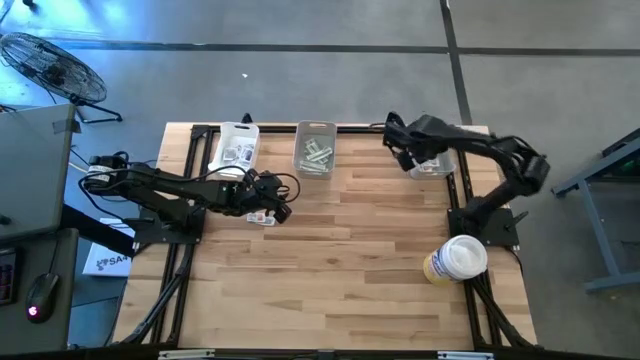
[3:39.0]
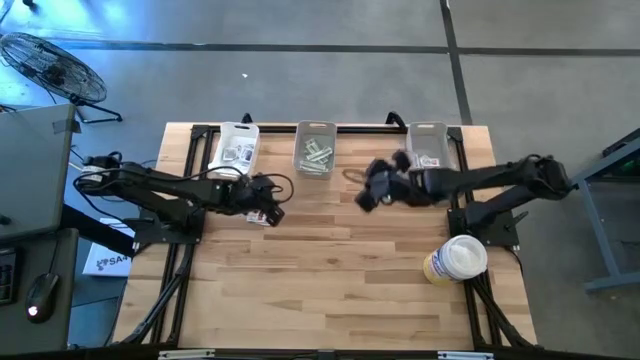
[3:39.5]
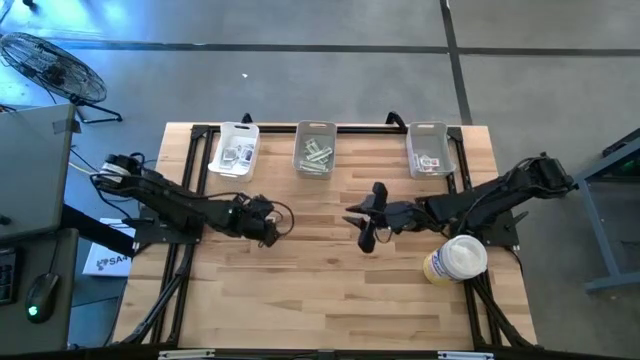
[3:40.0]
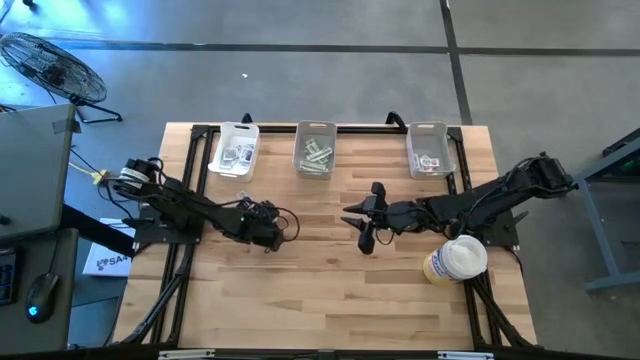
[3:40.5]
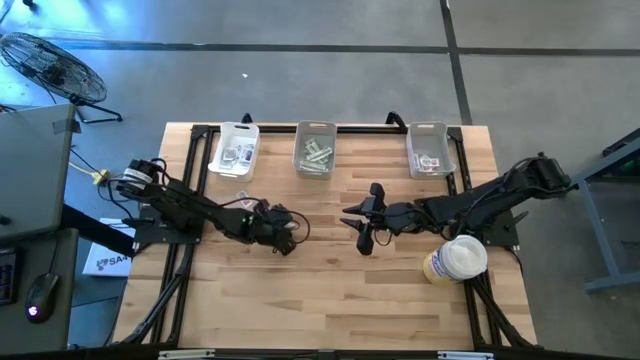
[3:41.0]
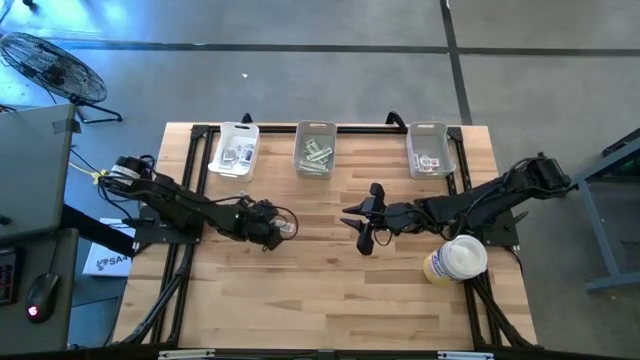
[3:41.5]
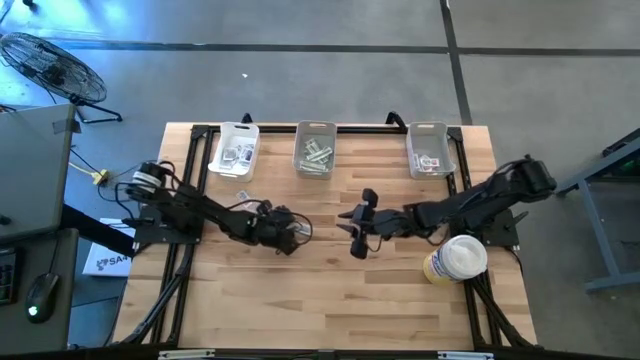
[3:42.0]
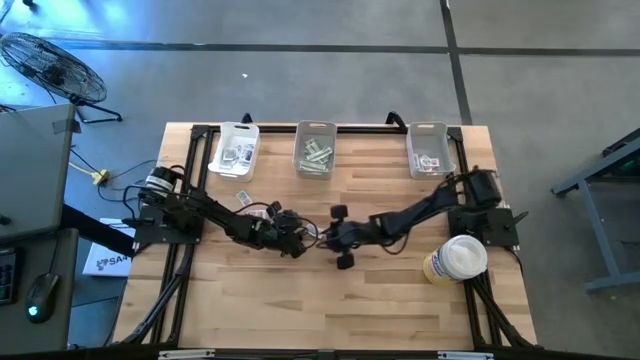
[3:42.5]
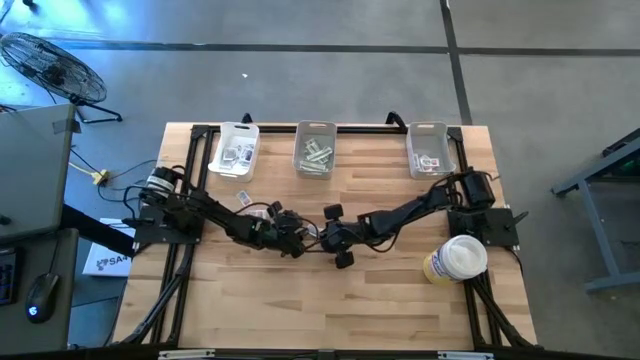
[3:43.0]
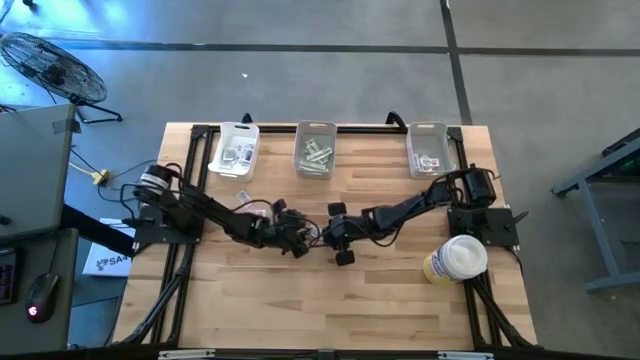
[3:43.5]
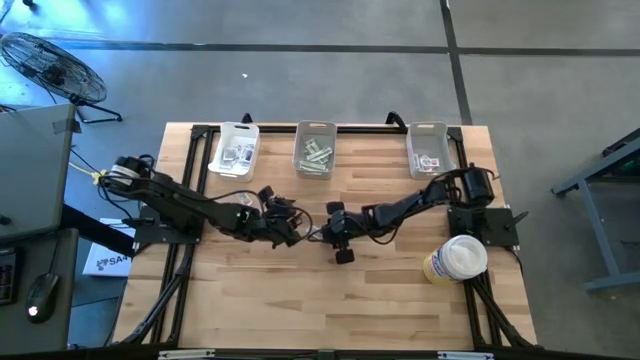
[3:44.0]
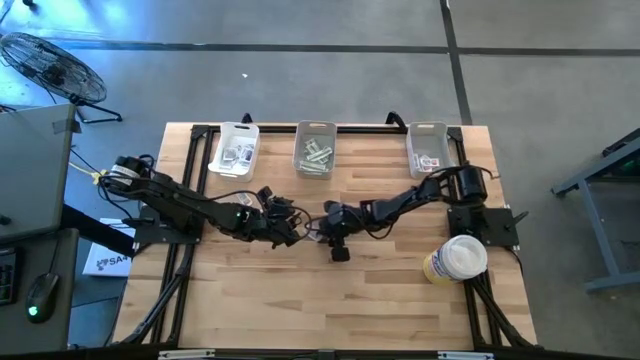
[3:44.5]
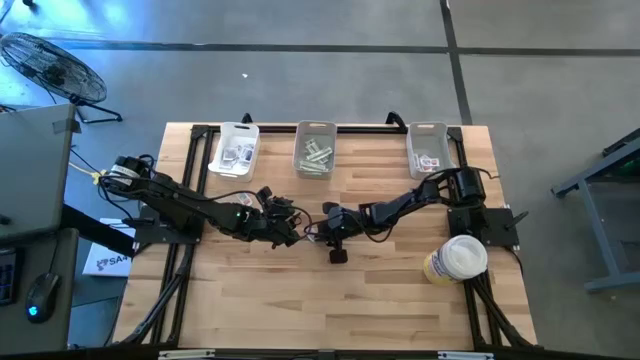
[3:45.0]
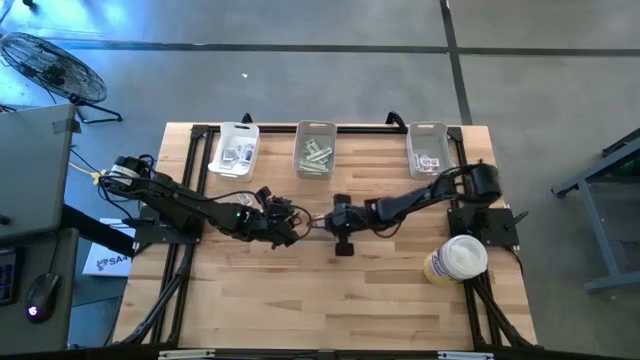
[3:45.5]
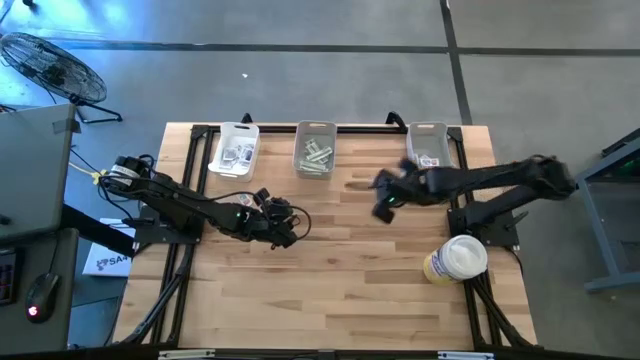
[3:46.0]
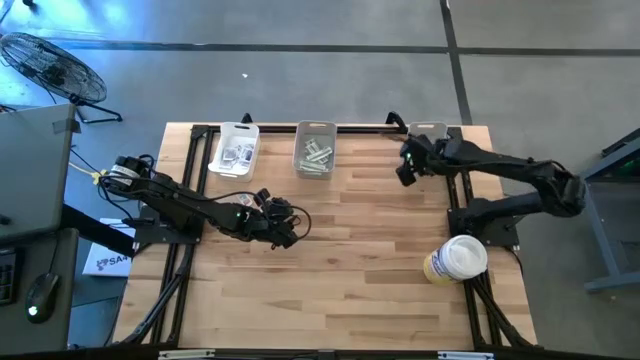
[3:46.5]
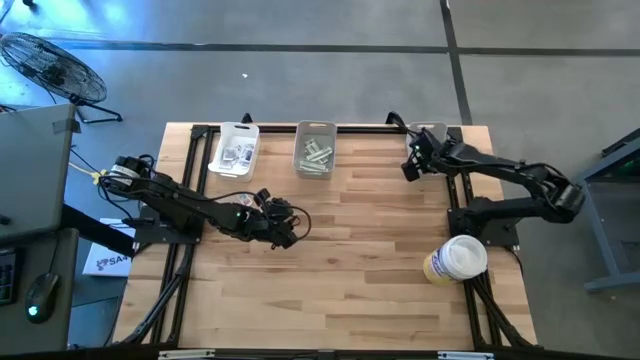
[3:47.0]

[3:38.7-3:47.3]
Task: Pick & Place First Aid Supplies
Put the orange pad into the right gray bin

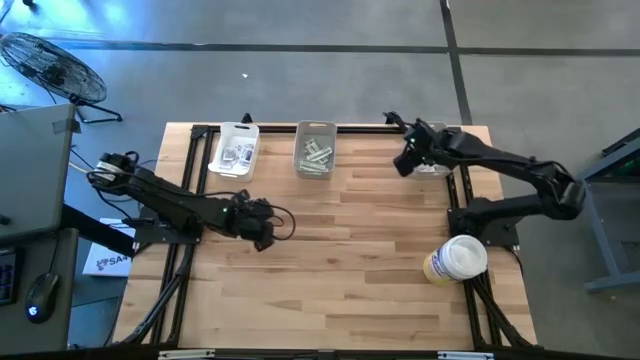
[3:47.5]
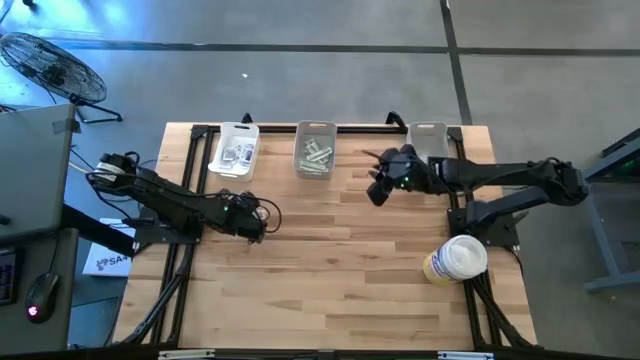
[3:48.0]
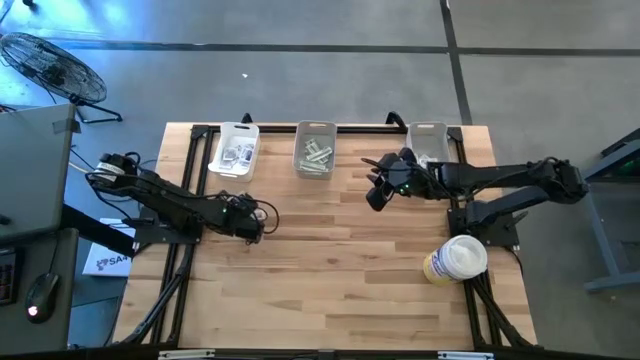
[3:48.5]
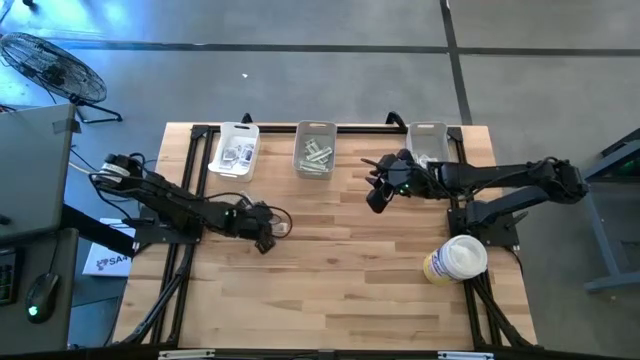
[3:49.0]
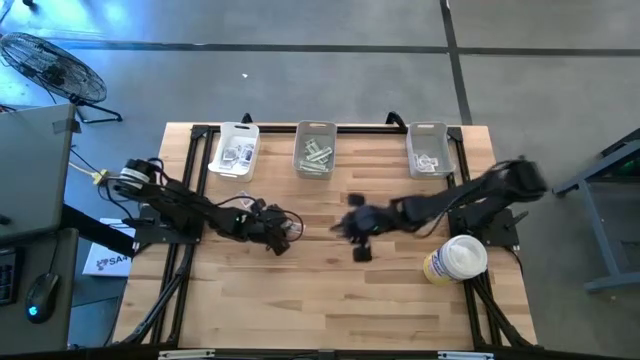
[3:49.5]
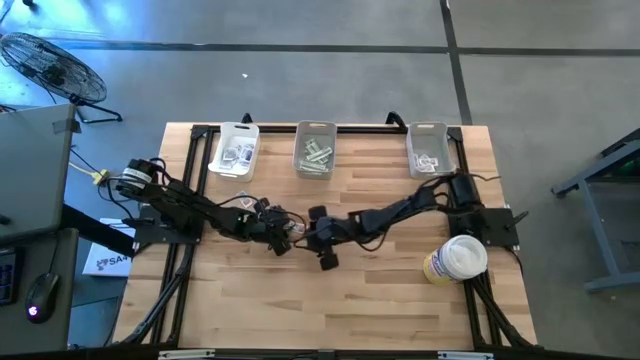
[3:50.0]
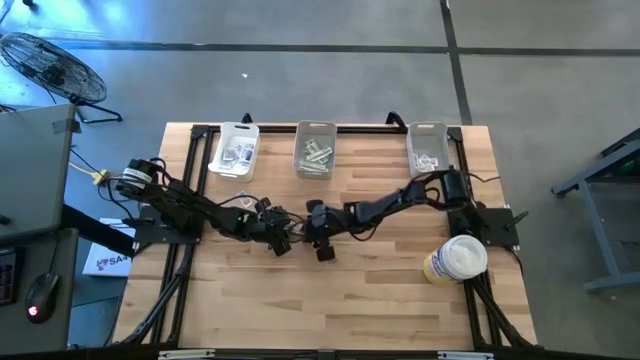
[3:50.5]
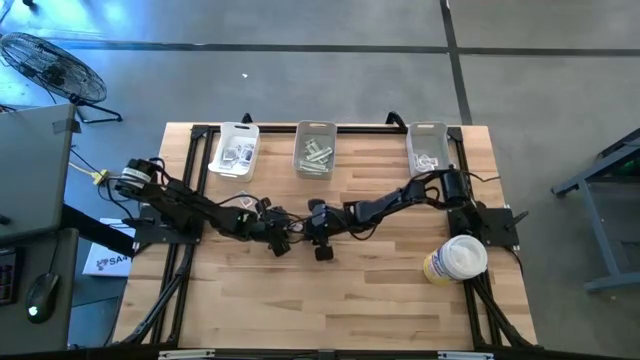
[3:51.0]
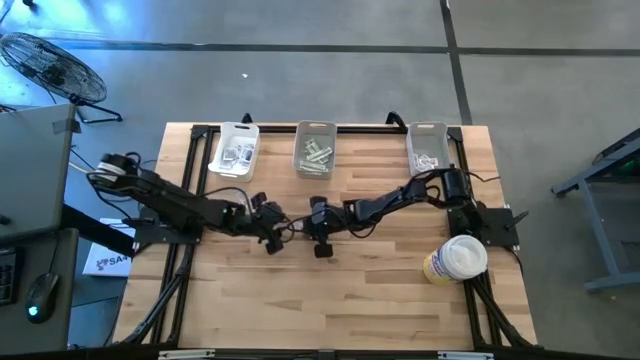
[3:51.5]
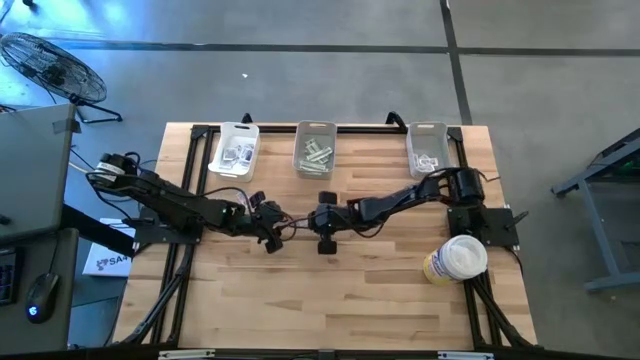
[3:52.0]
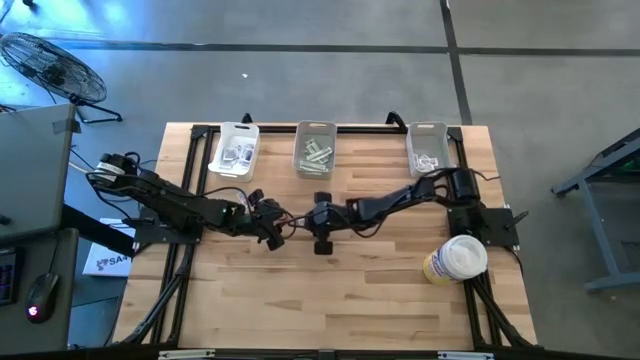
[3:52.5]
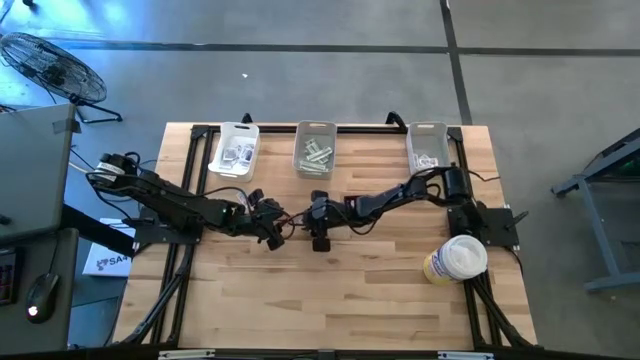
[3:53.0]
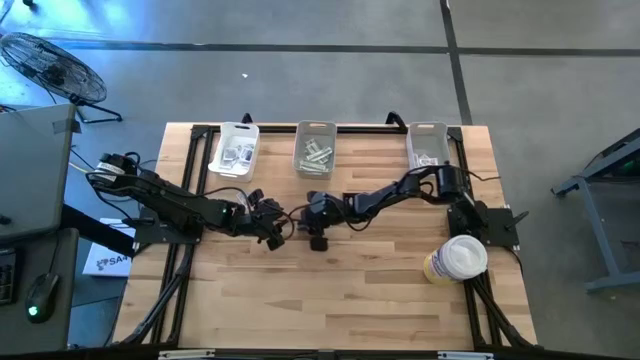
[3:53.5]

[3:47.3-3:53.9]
Put the orange pad into the right gray bin

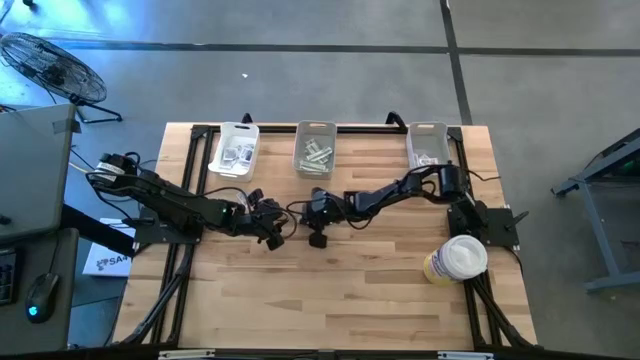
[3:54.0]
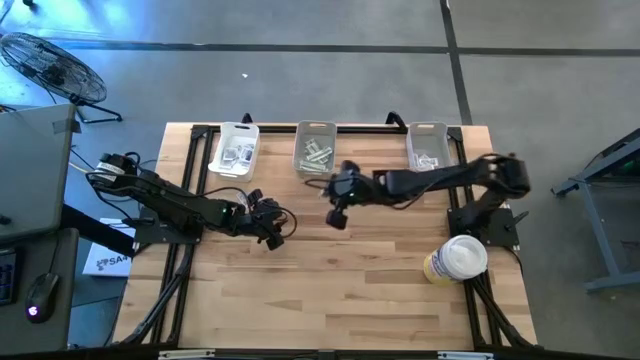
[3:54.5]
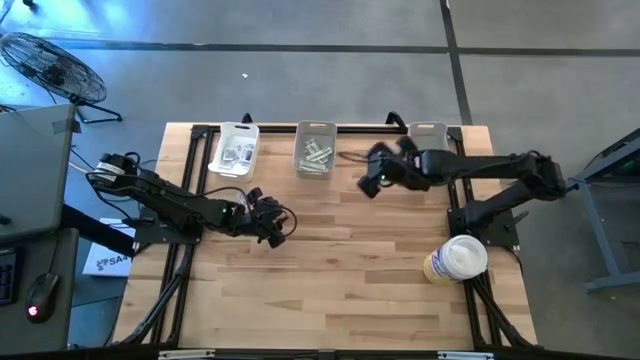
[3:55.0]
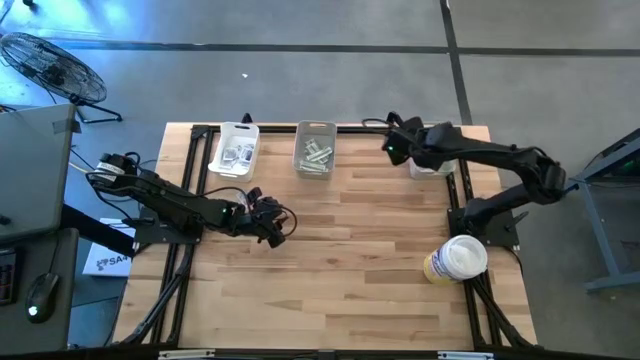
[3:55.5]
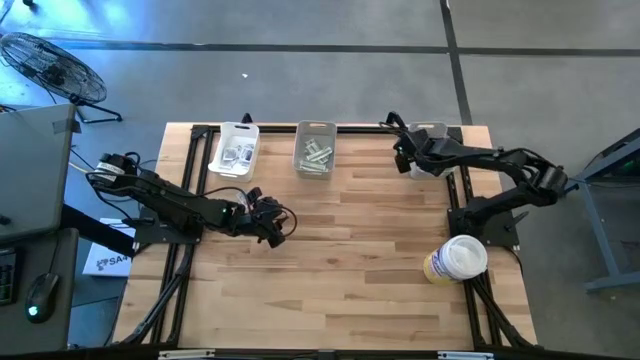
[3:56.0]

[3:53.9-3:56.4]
Put the orange pad into the right gray bin

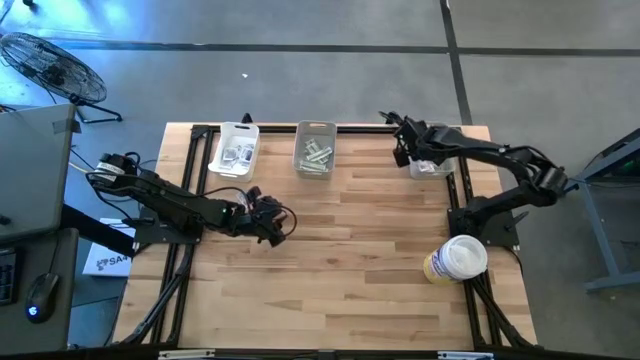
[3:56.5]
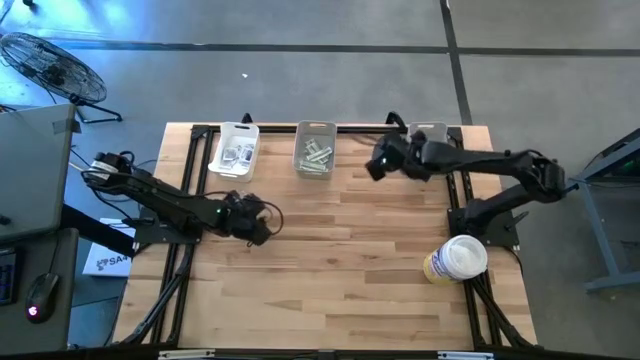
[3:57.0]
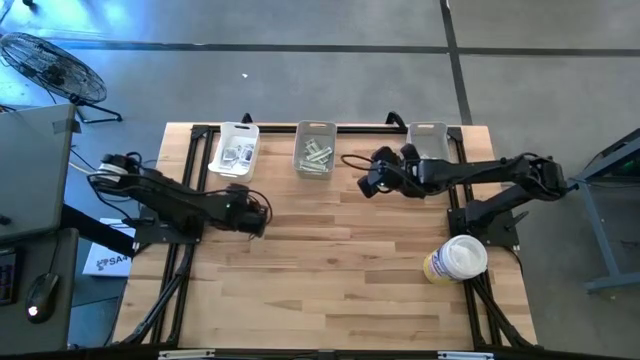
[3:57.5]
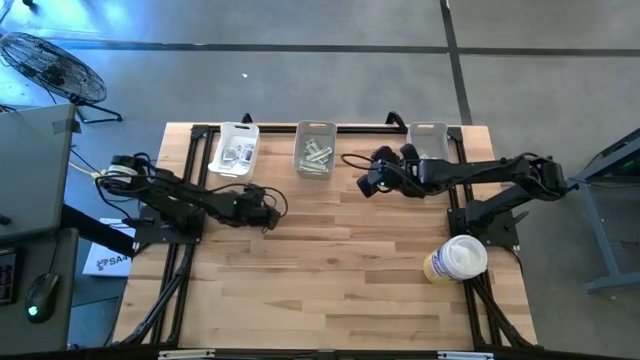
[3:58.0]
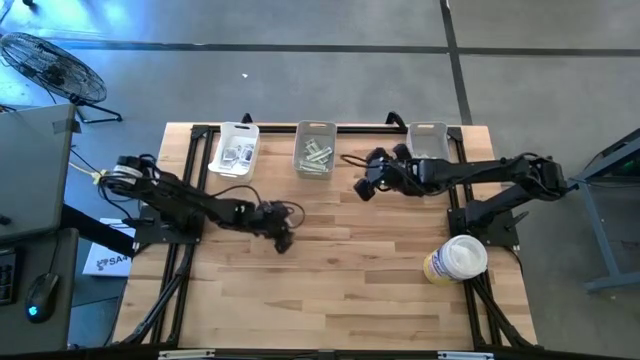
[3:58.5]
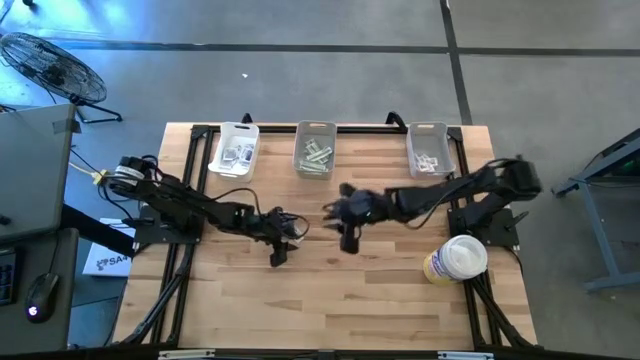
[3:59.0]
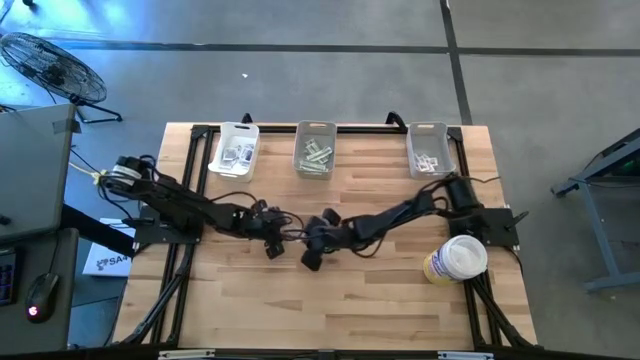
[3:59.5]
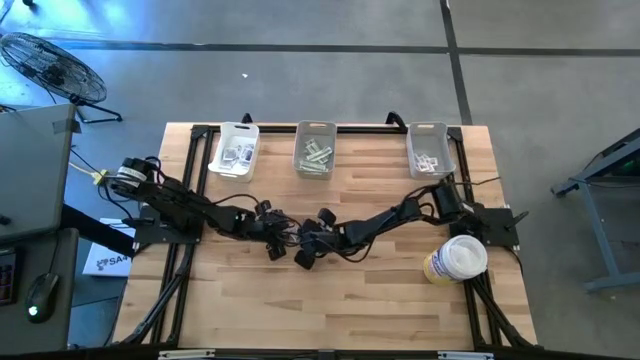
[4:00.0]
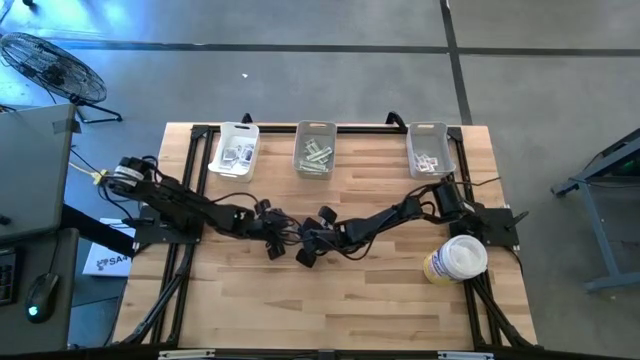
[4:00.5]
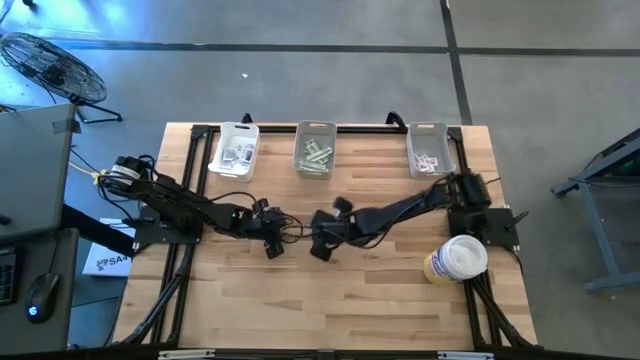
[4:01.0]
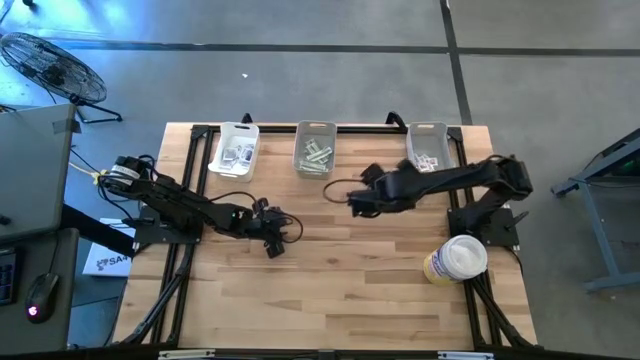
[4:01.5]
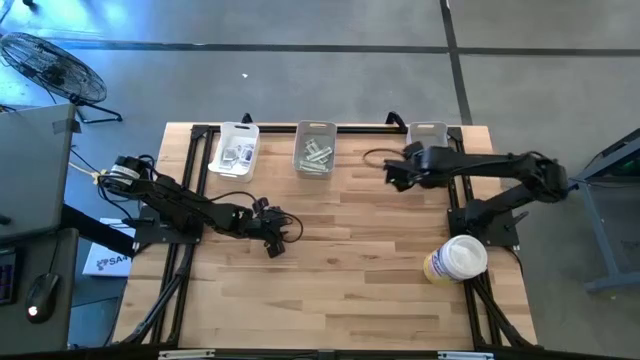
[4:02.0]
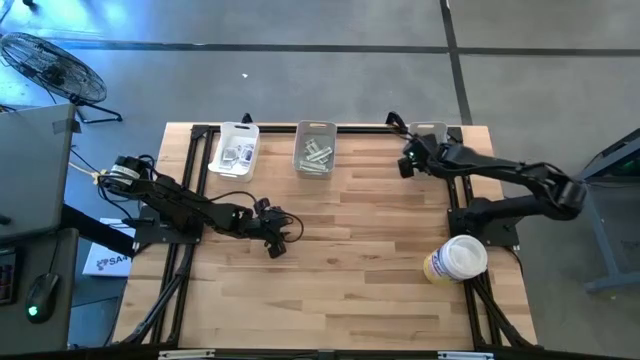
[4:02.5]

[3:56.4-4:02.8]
Put the orange pad into the right gray bin
